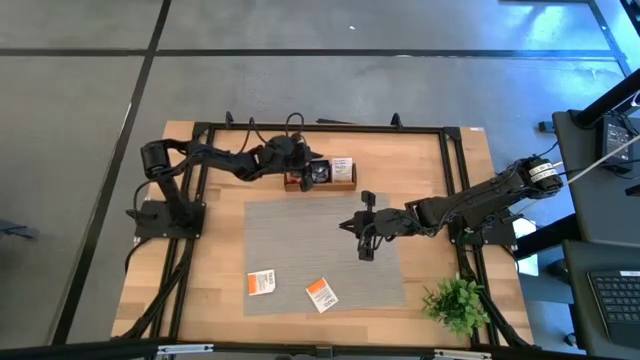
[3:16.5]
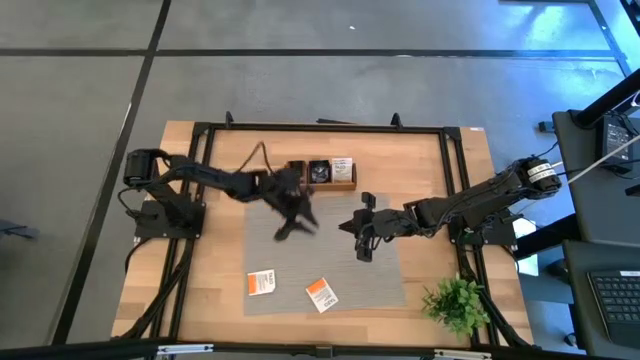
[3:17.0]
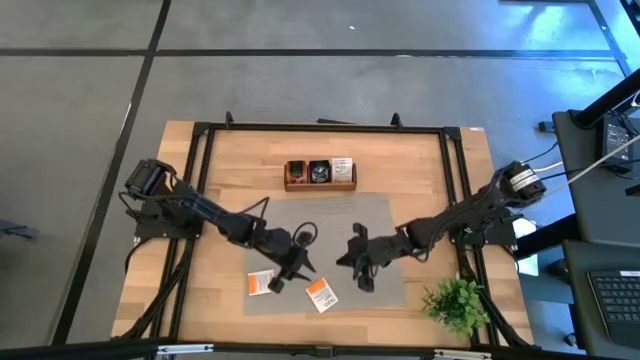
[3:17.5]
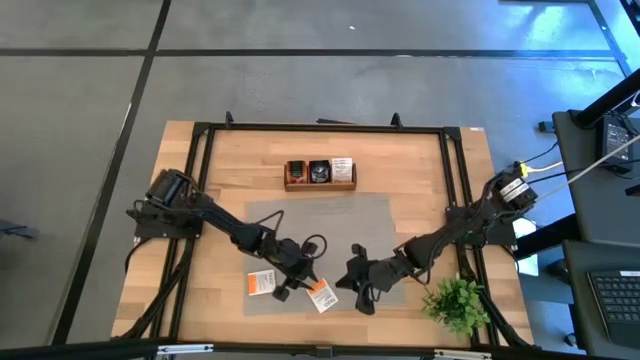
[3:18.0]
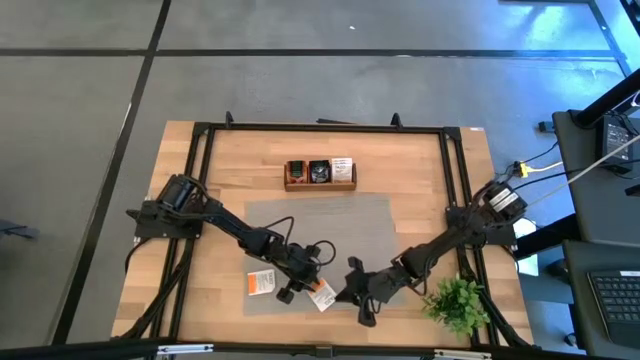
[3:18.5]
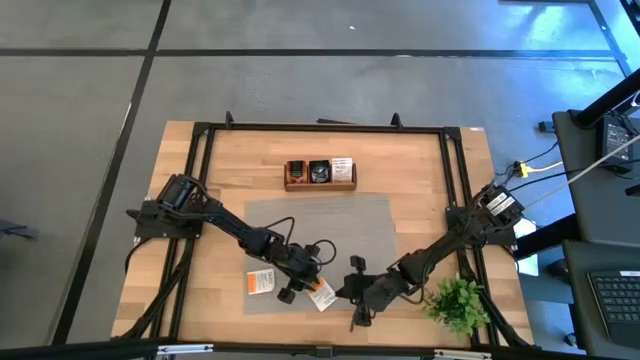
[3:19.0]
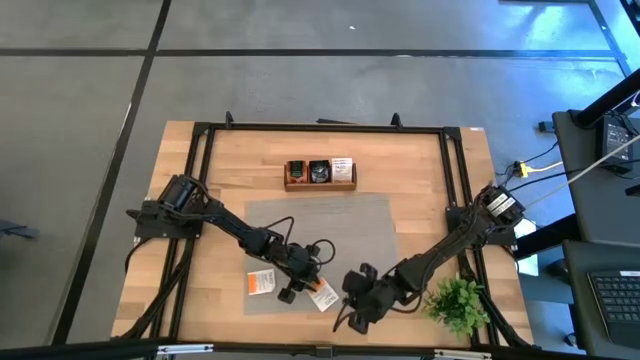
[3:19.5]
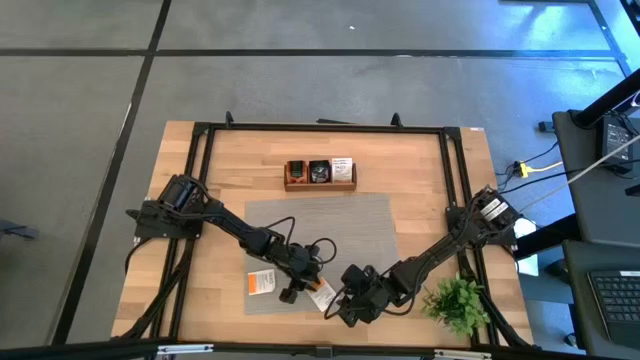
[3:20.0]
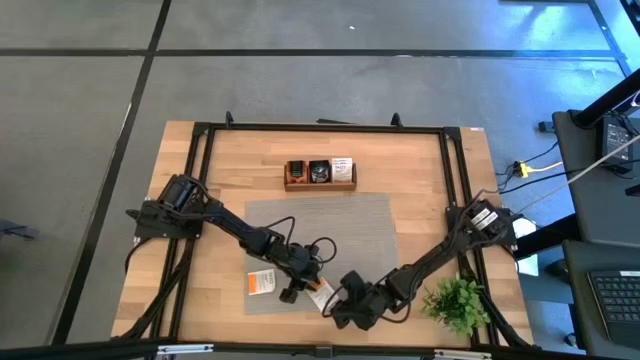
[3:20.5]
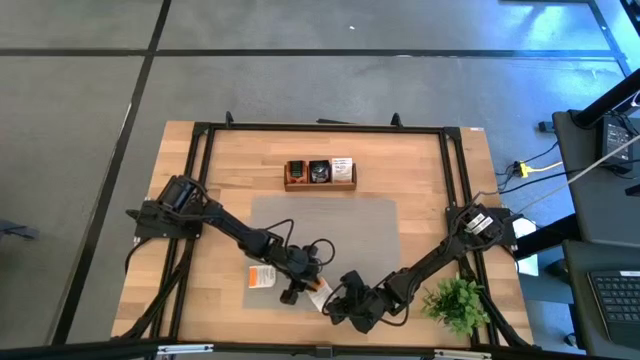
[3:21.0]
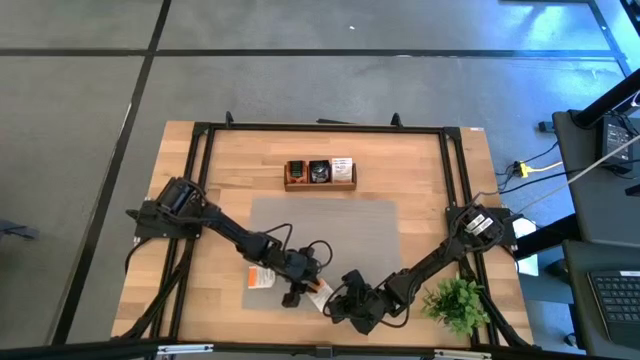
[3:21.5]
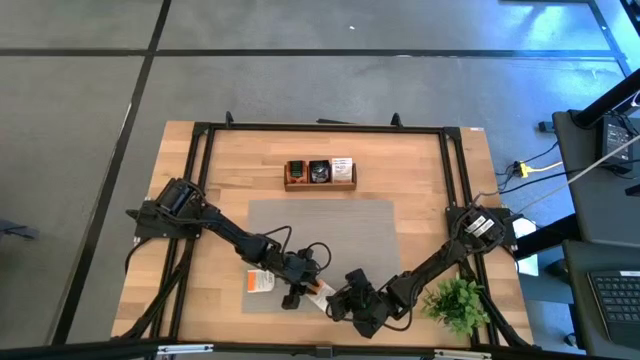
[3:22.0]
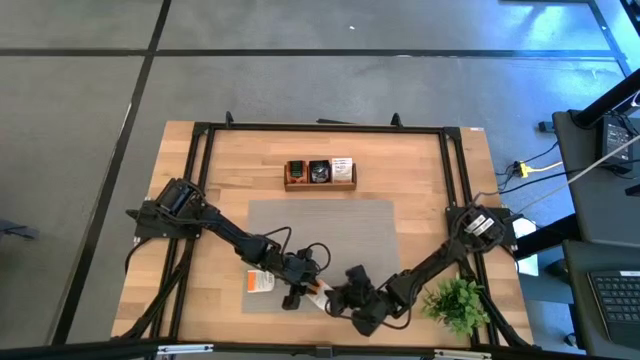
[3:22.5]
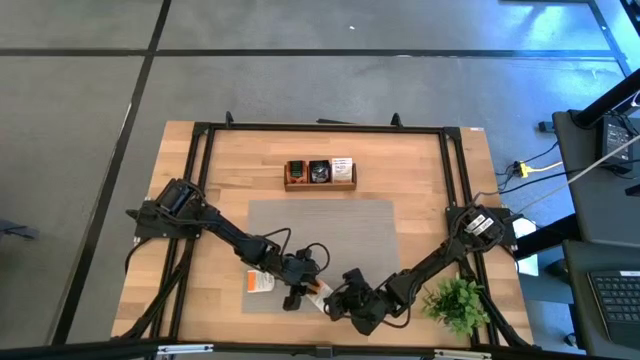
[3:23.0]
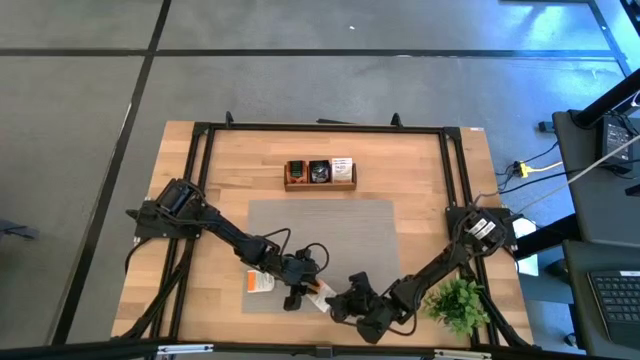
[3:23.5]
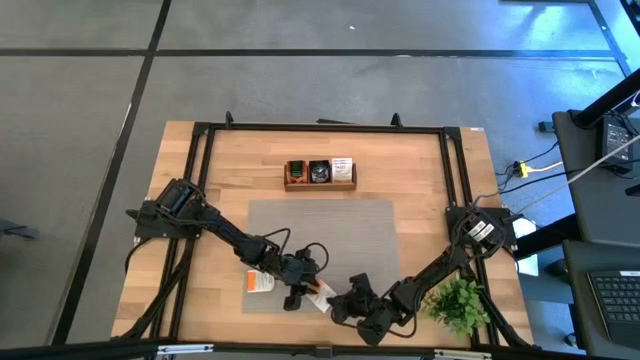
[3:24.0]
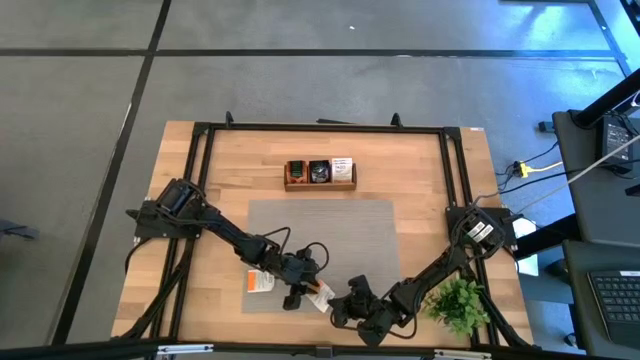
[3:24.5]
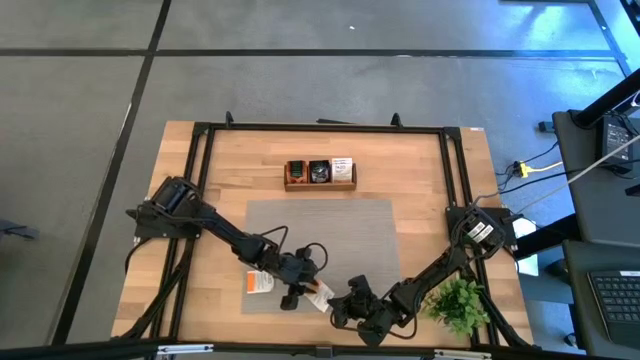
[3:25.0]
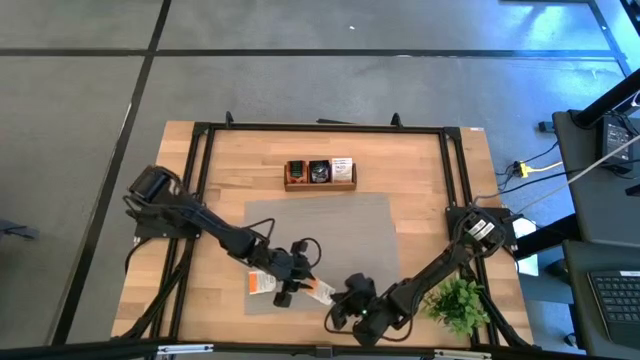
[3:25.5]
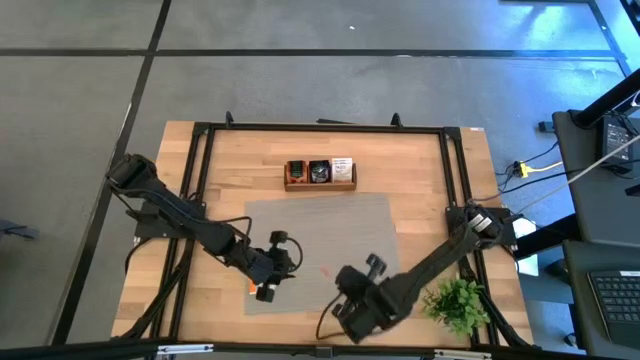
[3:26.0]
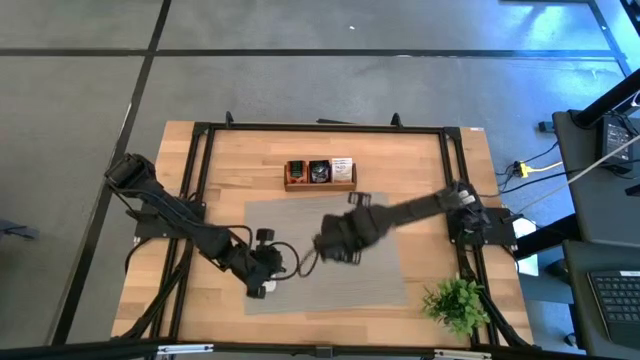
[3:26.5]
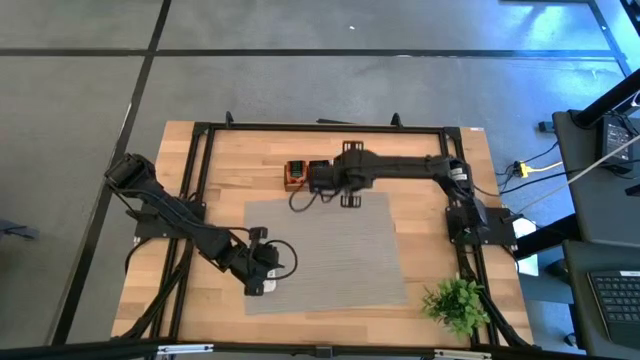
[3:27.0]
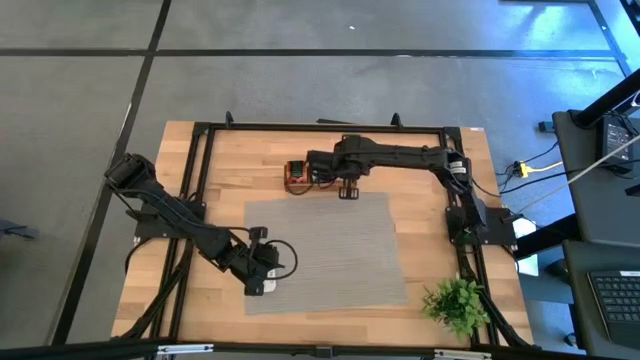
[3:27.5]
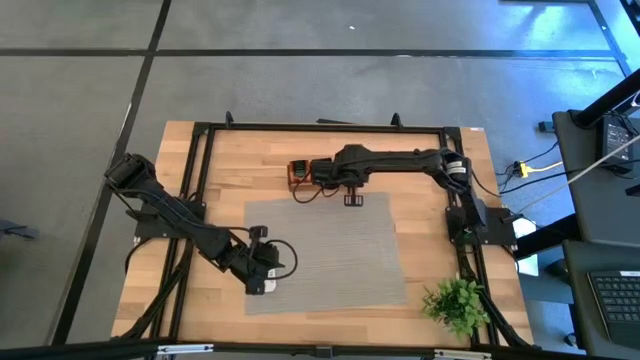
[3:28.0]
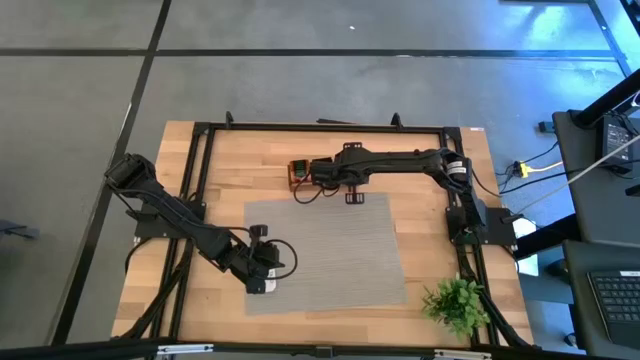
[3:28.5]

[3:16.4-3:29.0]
Task: Pick & Place Tea
Put the white orange tea bag into the right section of the wooden organizer

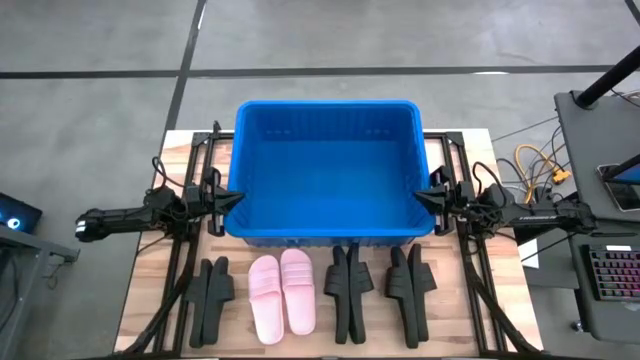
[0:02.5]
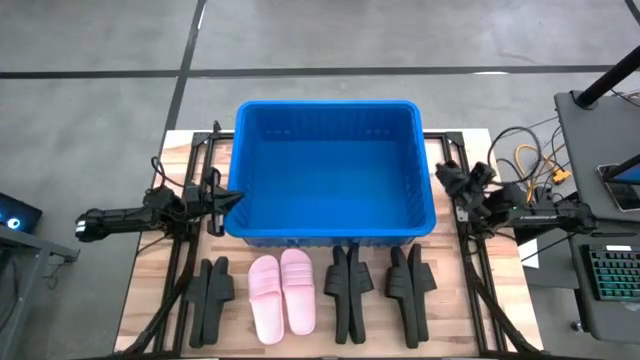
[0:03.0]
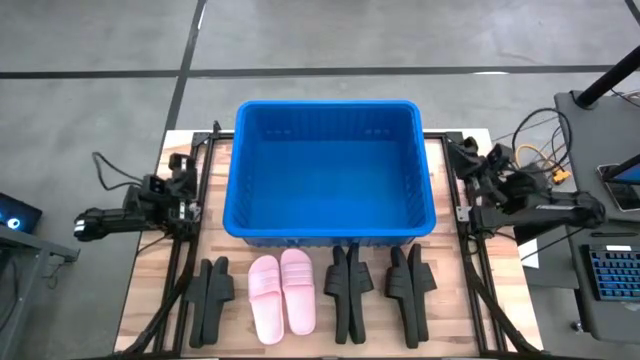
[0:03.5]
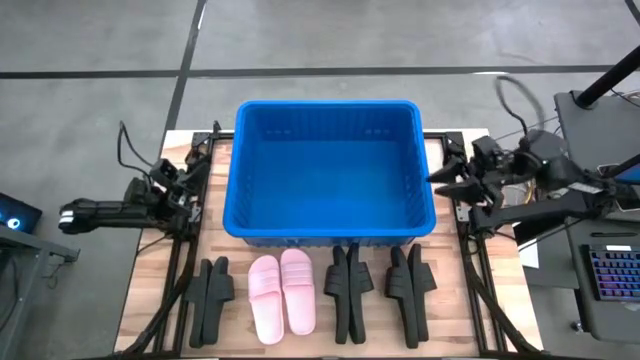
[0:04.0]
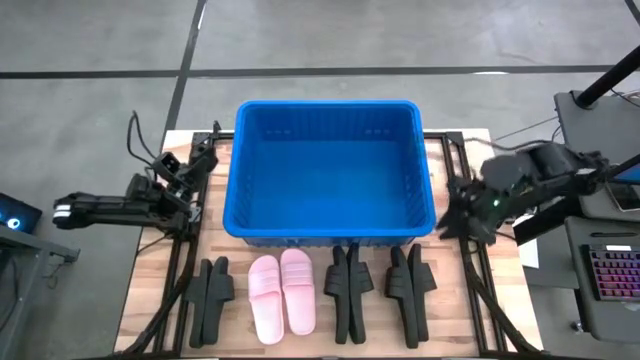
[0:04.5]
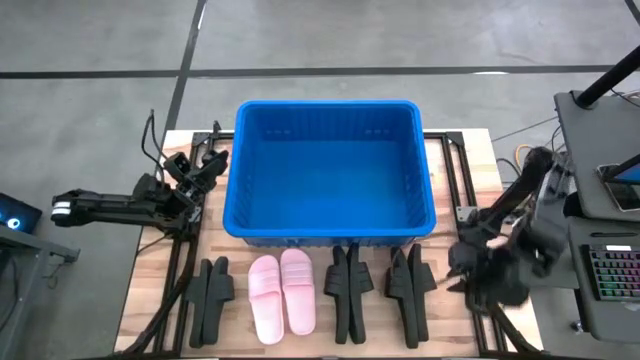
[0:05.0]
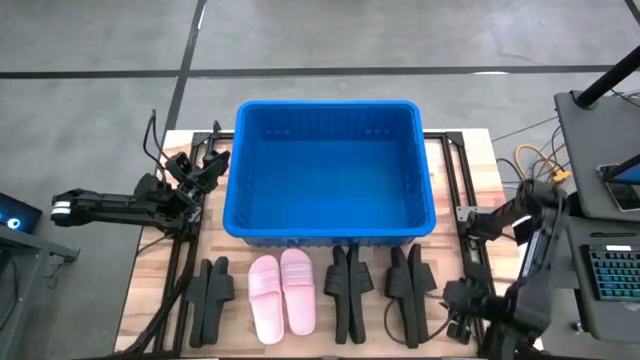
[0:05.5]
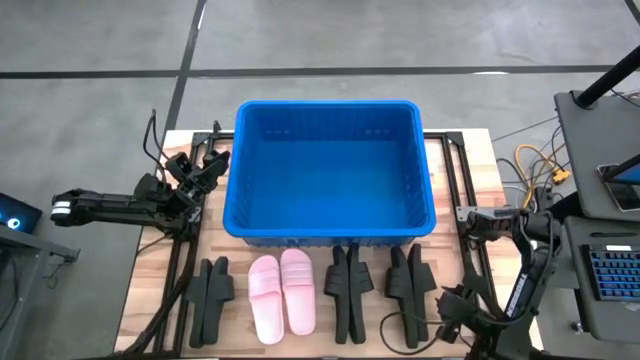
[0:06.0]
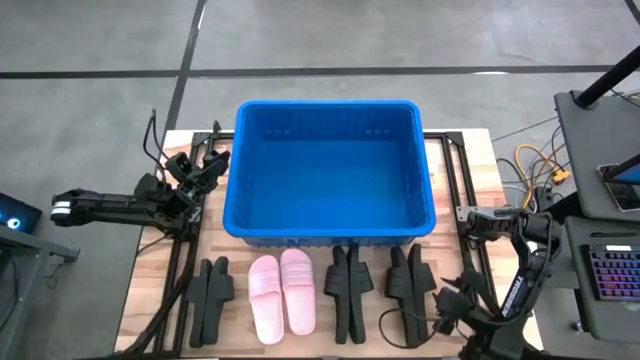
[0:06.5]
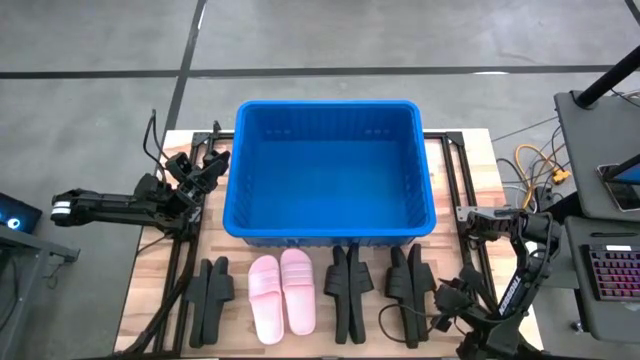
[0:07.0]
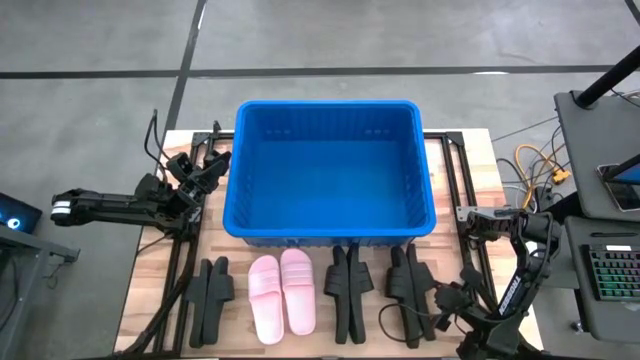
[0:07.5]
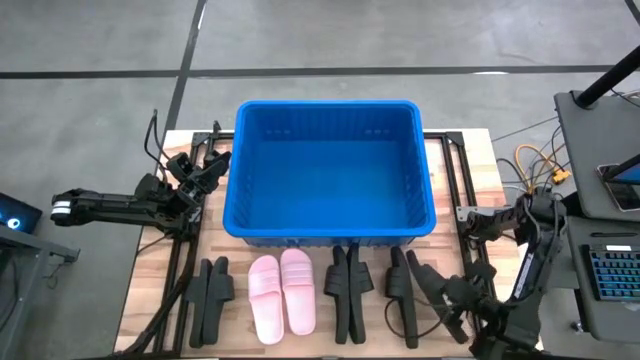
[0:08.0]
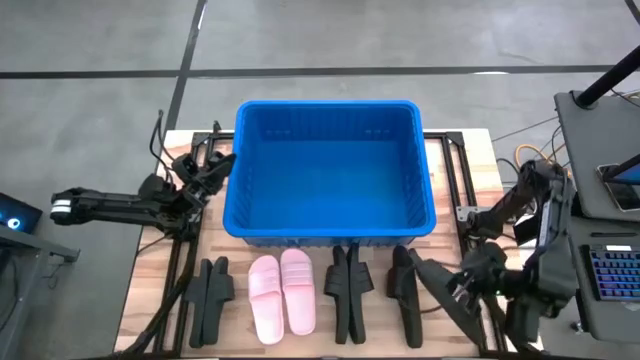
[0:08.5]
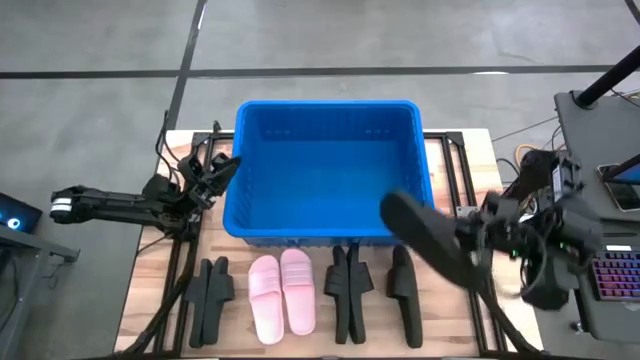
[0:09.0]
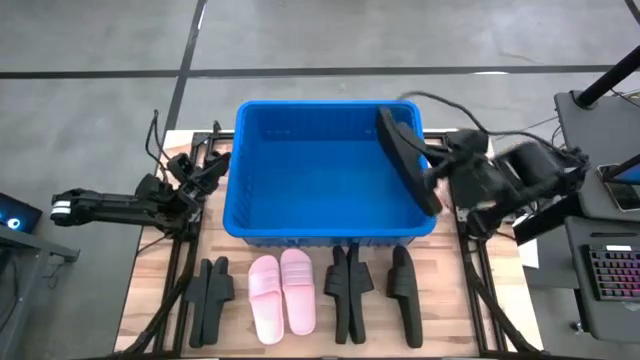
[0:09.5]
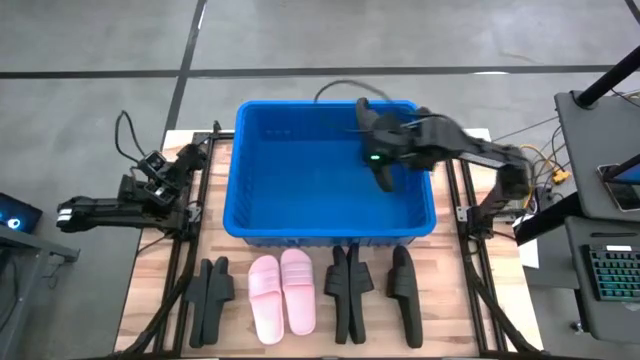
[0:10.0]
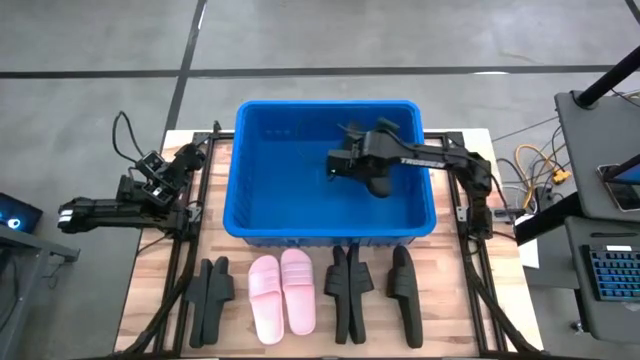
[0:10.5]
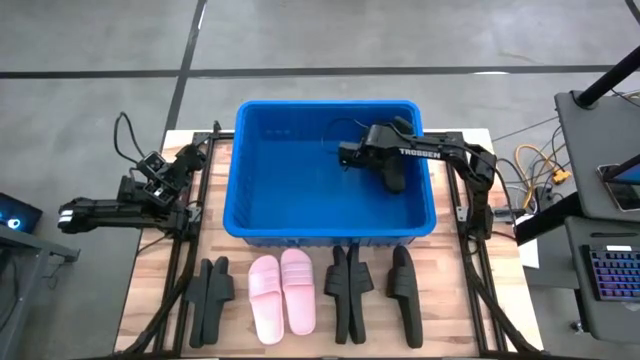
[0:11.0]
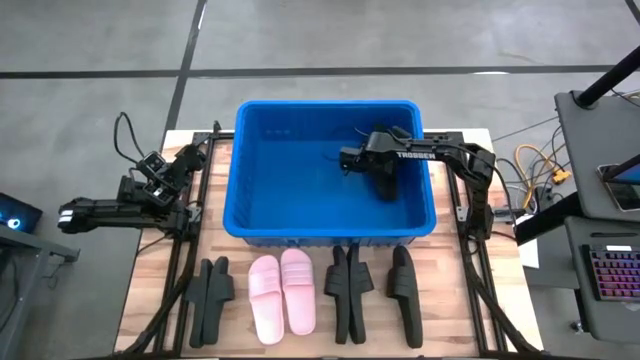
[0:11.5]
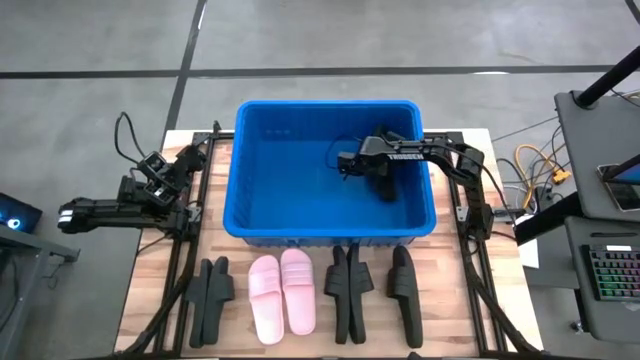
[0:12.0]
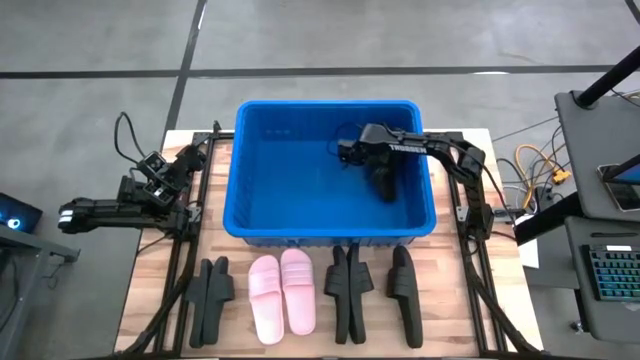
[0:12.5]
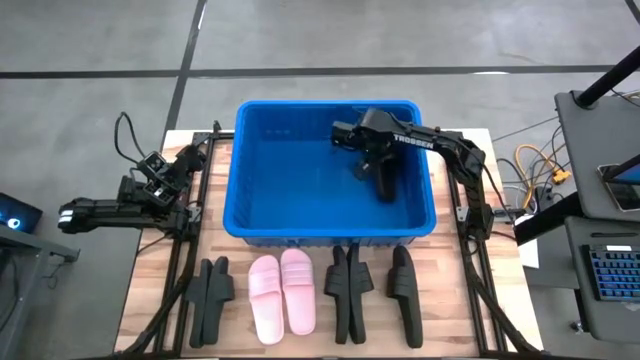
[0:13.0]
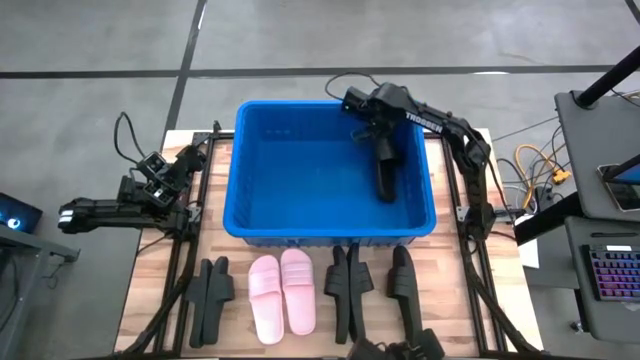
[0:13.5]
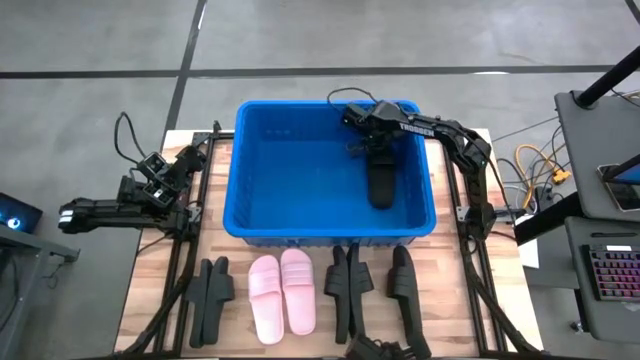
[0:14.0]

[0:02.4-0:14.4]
Task: Pick and place slides into bin
Put the black slipper into the blue bin
